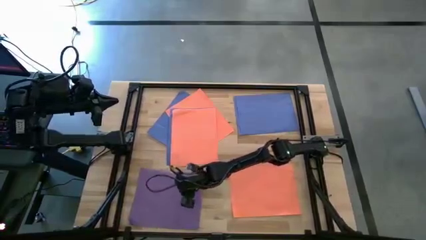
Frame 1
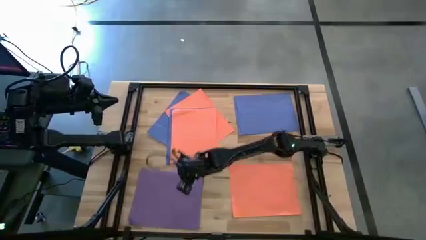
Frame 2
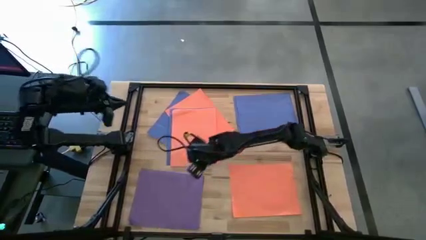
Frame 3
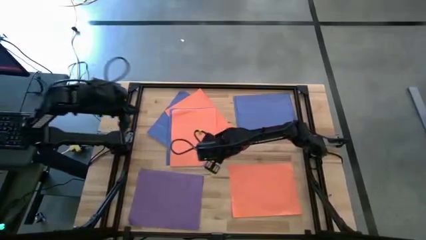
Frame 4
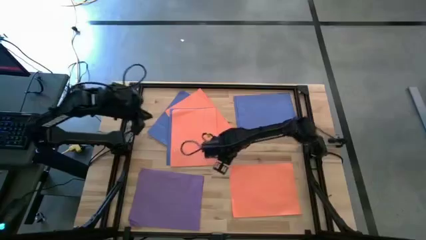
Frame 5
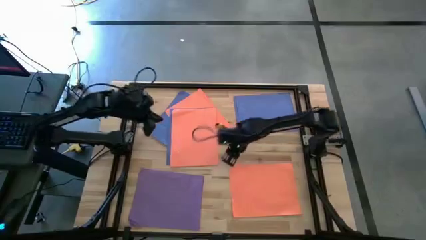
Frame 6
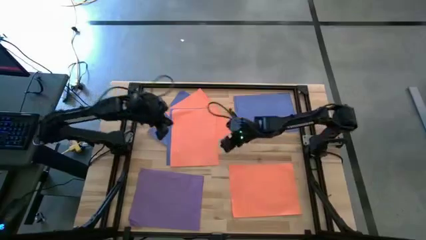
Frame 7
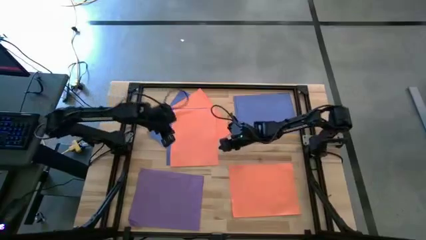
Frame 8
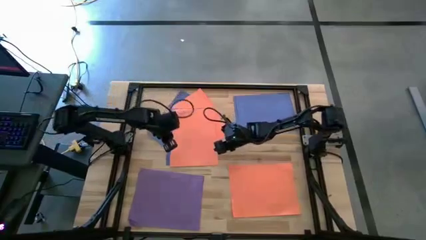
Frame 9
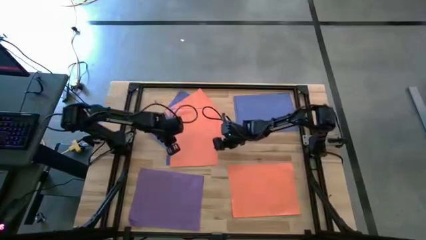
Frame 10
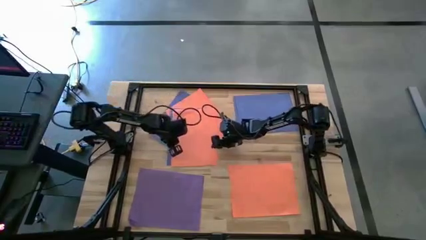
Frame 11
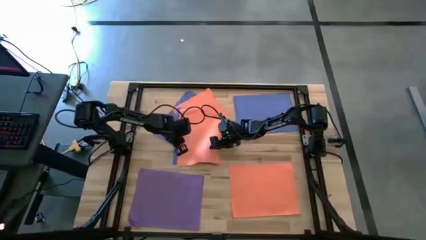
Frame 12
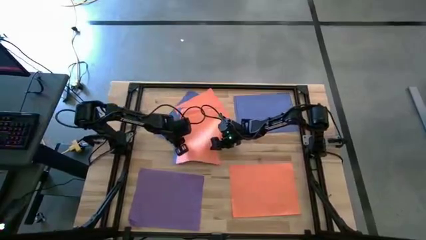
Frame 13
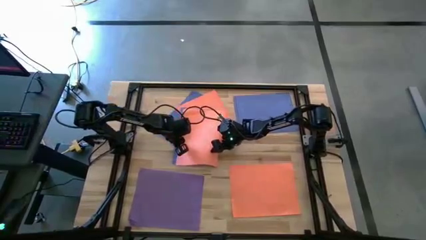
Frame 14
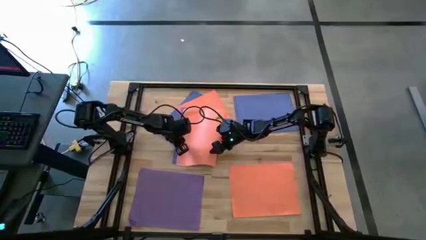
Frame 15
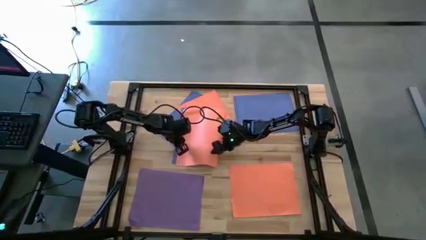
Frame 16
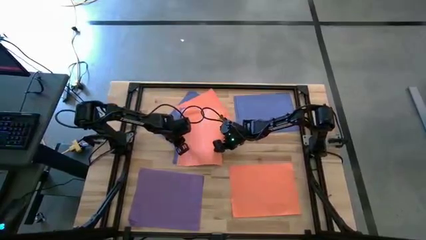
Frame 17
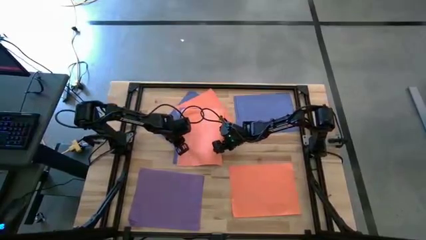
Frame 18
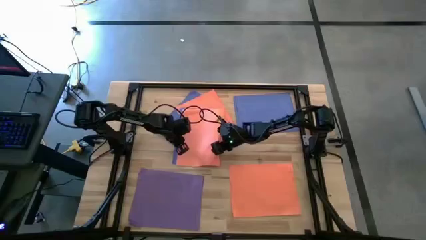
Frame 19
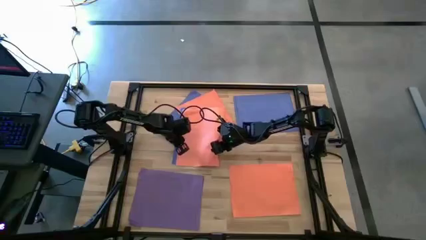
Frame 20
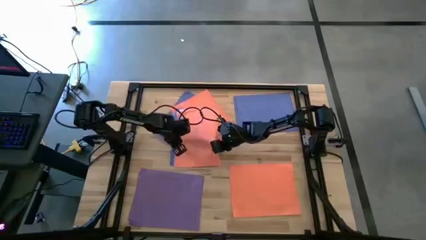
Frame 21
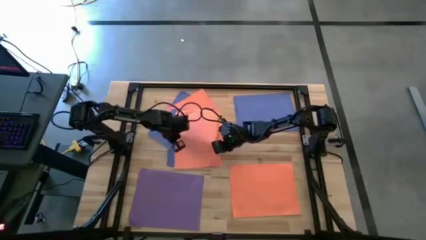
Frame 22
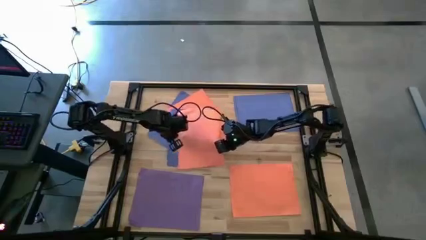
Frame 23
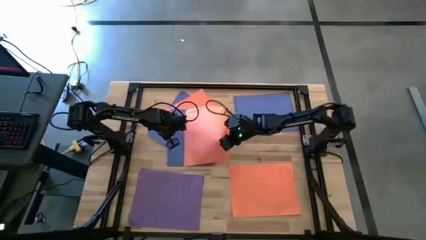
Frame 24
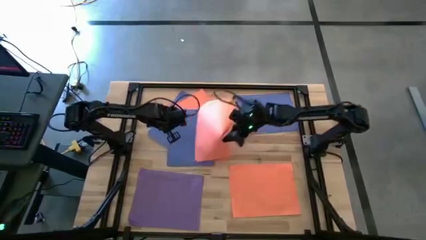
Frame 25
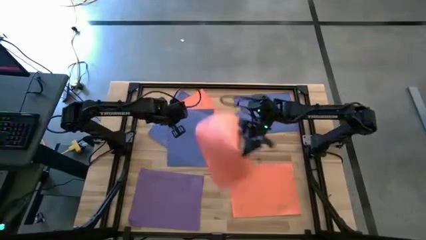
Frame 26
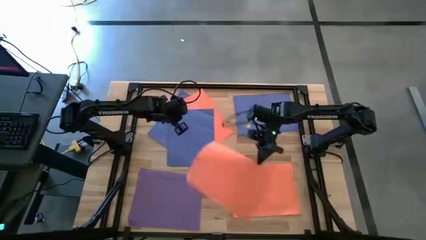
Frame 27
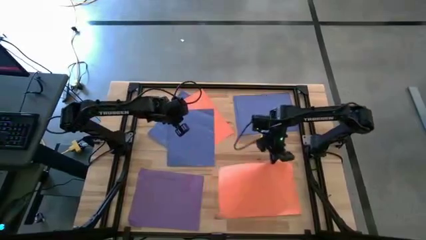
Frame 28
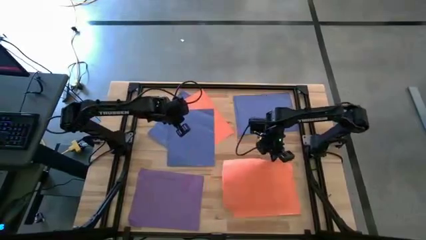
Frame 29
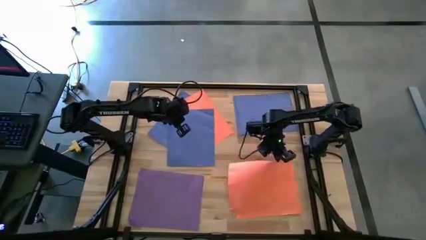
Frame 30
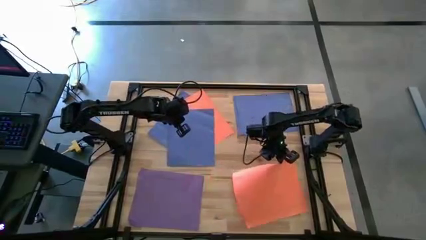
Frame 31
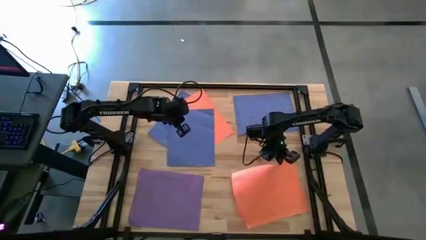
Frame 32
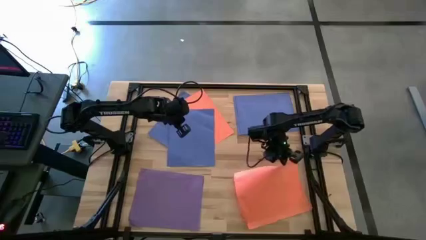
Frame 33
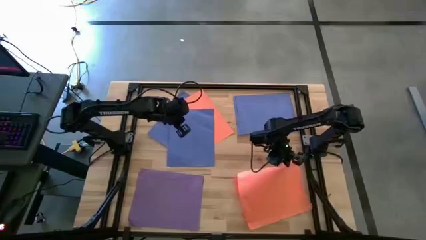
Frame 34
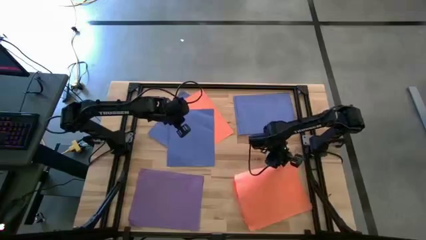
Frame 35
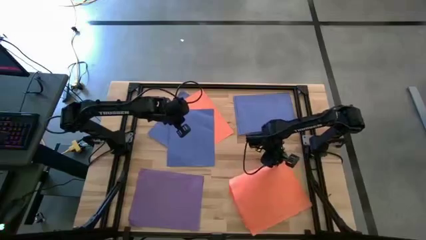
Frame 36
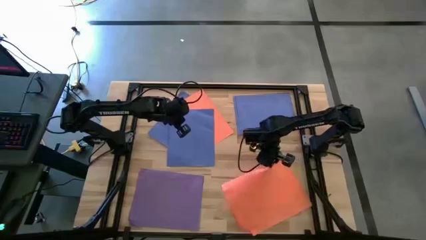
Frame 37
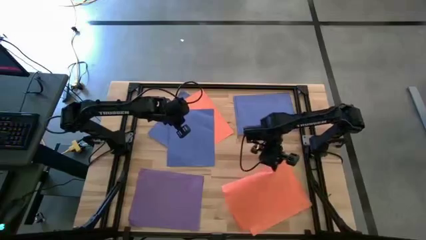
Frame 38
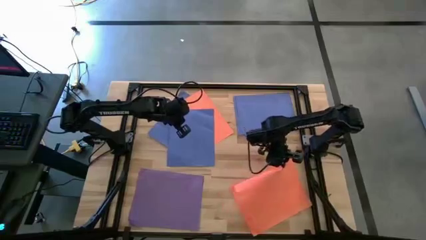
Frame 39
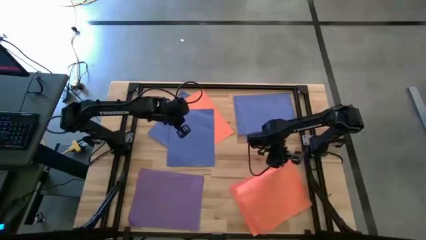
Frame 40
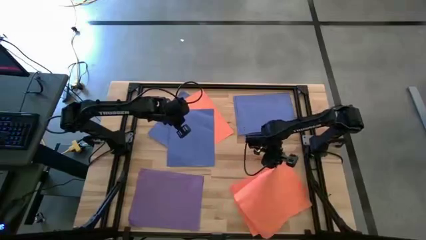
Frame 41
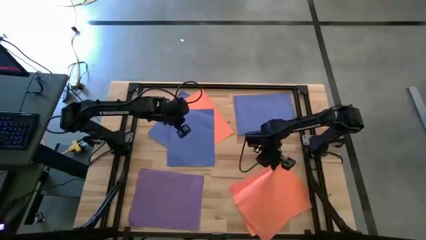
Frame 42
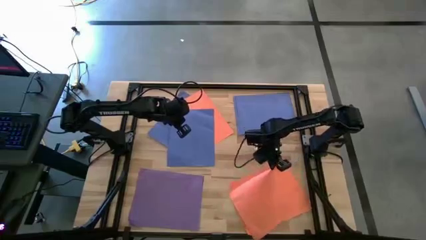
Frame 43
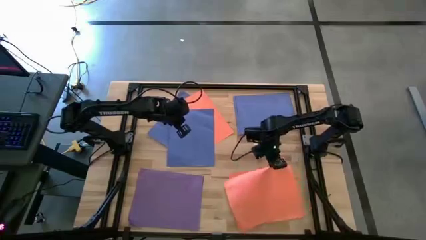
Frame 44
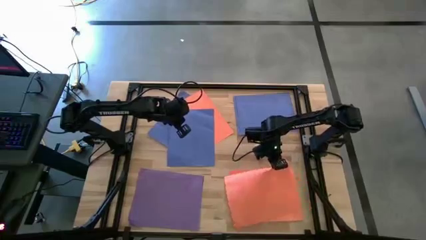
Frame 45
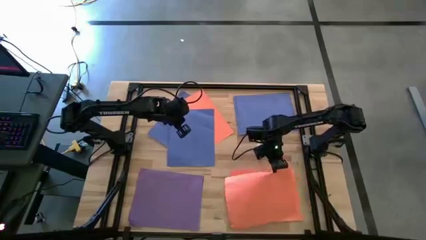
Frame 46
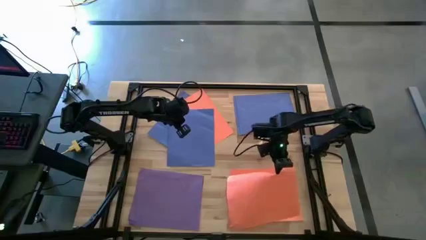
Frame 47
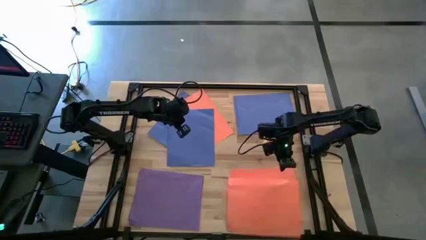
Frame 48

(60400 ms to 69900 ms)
Task: Organize paper
Stack the orange colored paper on top of the orange colored paper

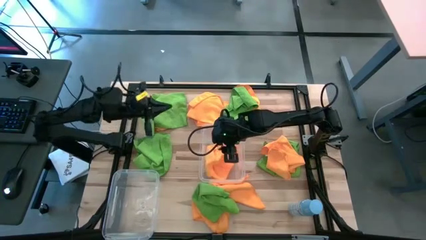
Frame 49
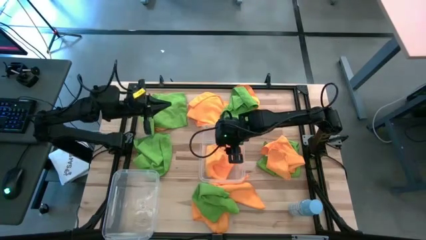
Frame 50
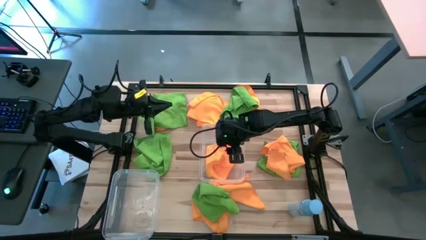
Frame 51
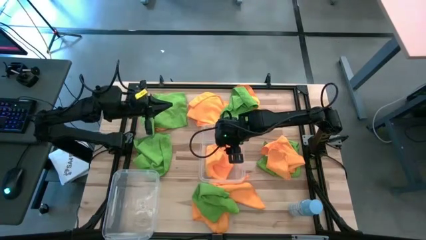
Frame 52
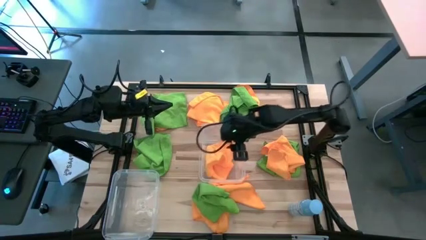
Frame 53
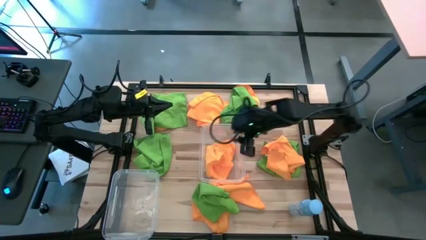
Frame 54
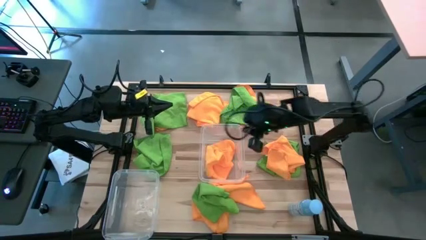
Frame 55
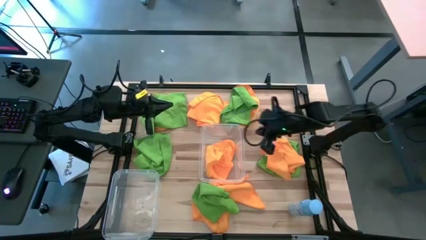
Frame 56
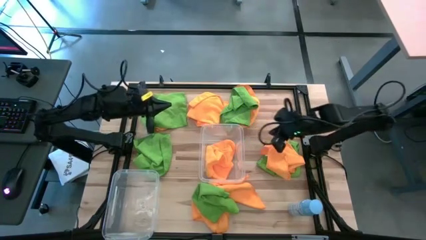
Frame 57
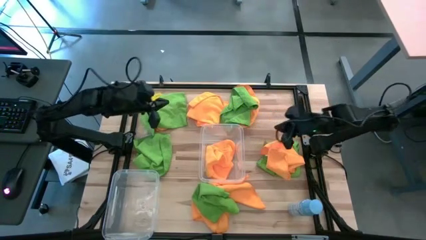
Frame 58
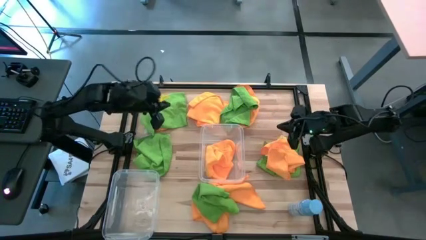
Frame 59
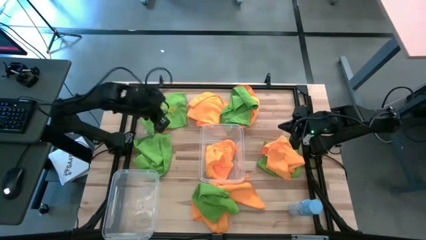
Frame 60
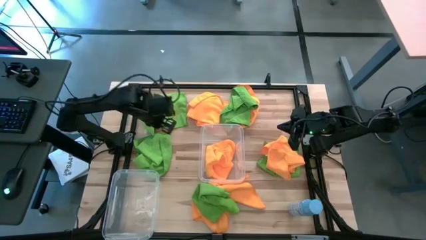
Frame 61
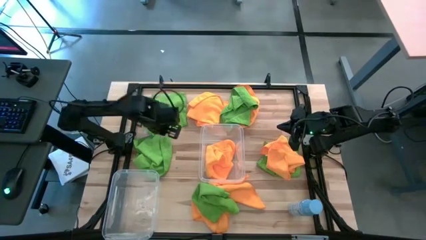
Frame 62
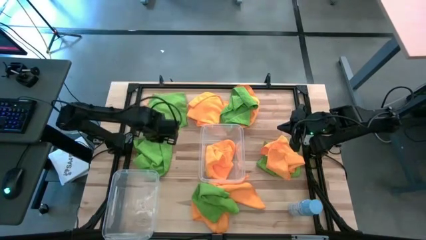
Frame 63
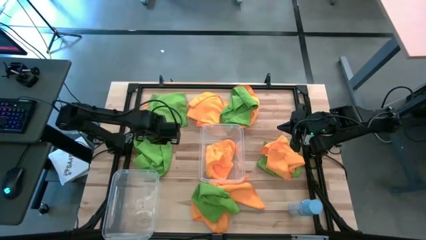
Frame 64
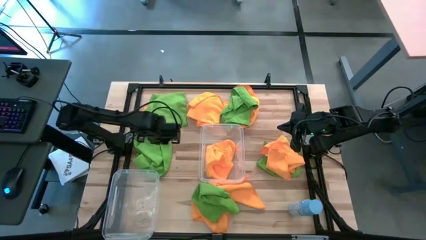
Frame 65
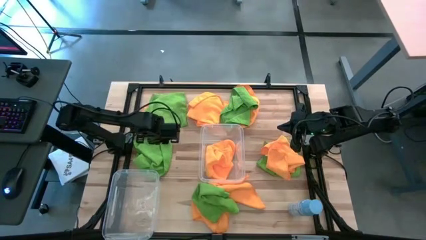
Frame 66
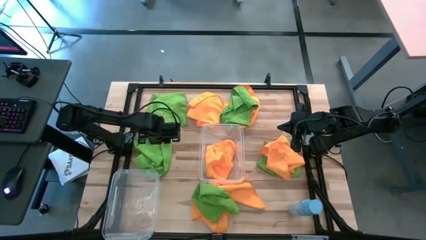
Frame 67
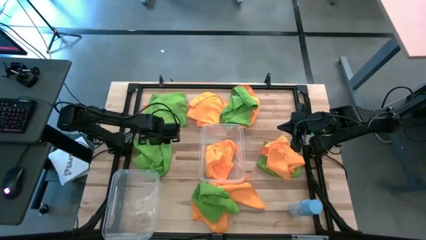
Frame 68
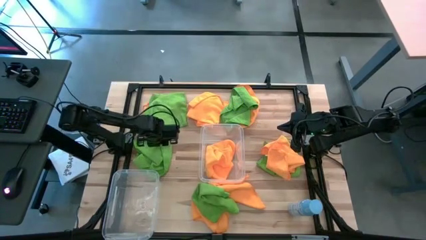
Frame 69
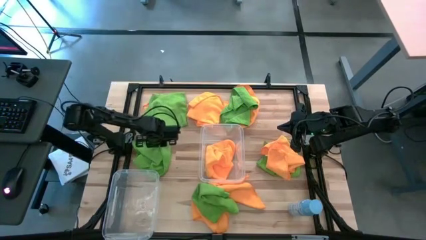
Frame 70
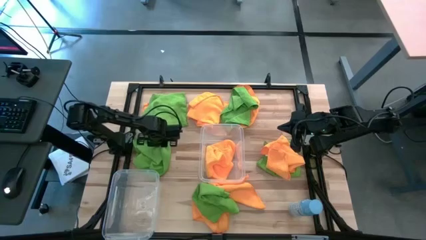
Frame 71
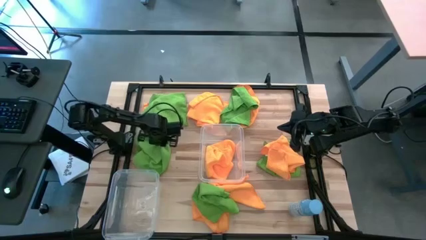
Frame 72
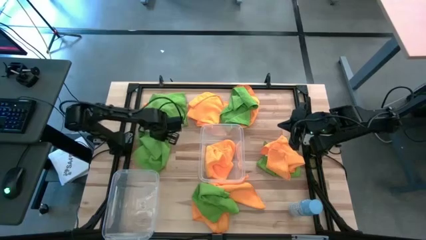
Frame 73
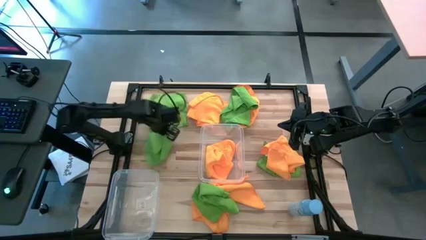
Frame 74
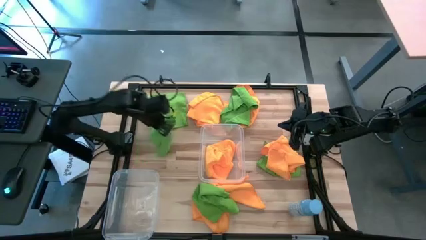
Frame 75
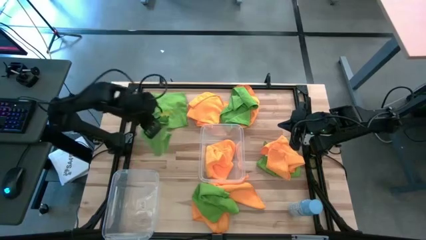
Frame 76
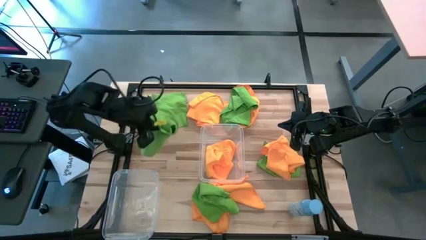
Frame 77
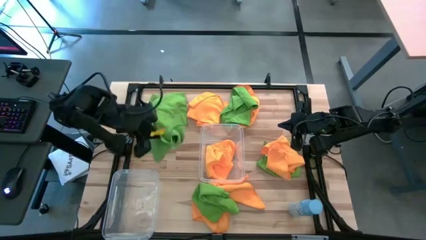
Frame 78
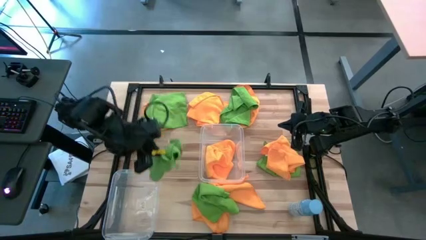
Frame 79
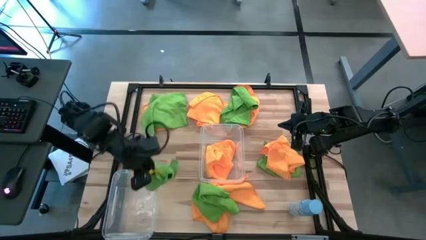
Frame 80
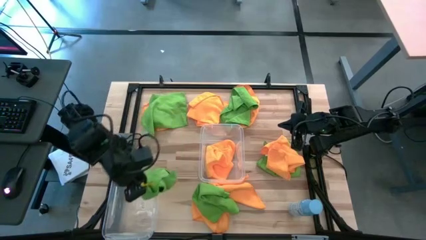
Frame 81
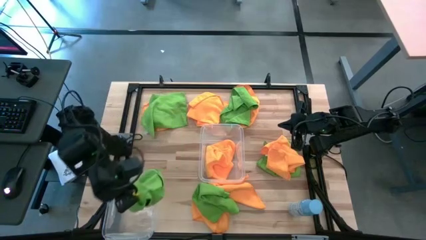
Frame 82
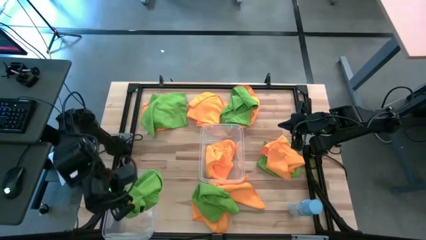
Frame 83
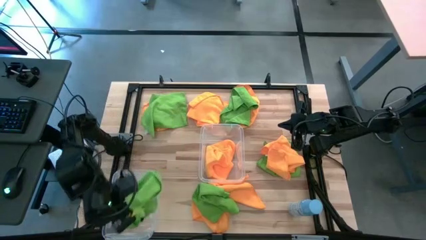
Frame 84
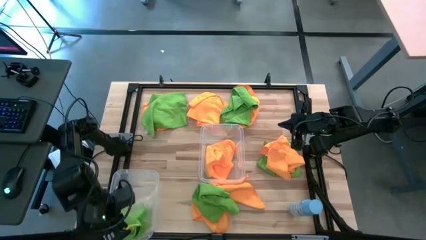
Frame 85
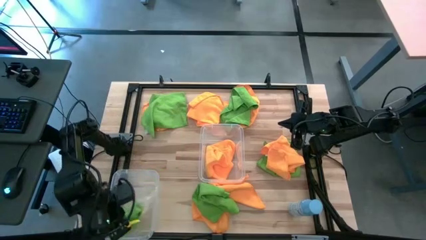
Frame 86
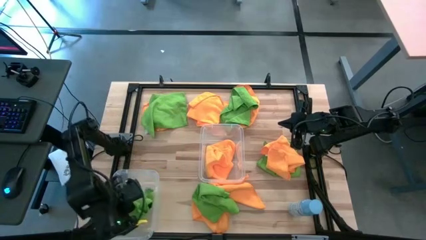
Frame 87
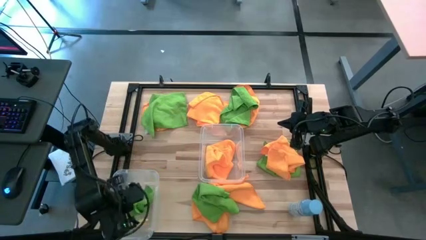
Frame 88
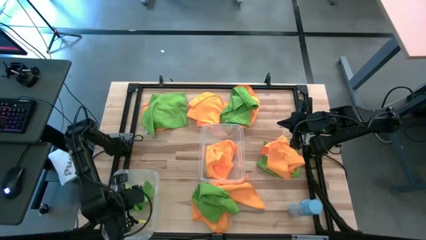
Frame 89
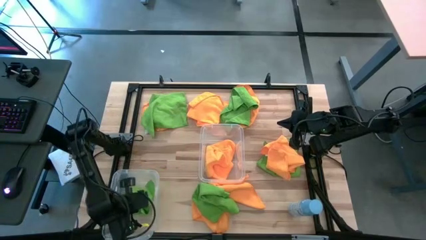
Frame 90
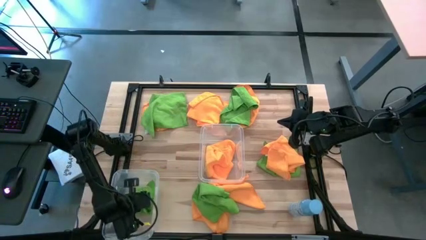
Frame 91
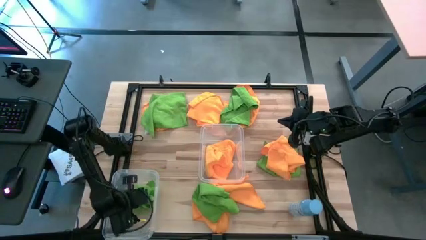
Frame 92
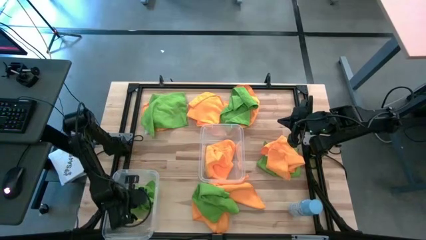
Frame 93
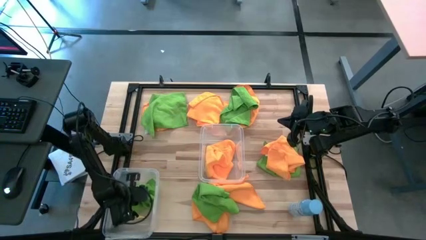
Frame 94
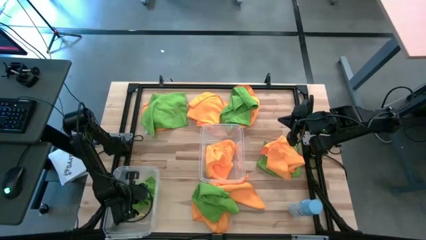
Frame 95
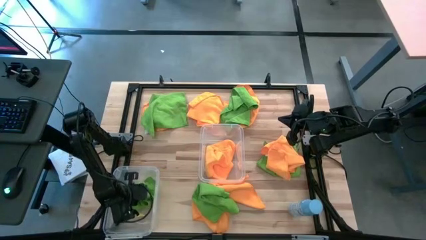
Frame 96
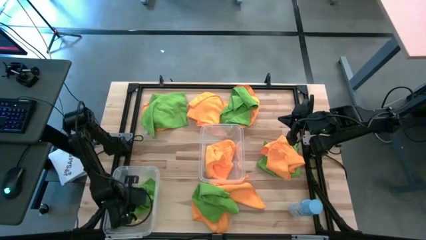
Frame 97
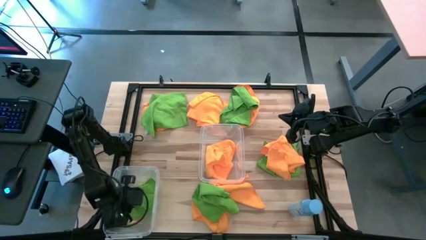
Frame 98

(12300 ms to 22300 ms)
Task: Sort microfiber towel by color & place in baskets
Put the yellow microfiber towel into the right transparent bin
